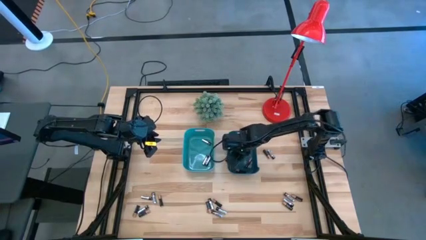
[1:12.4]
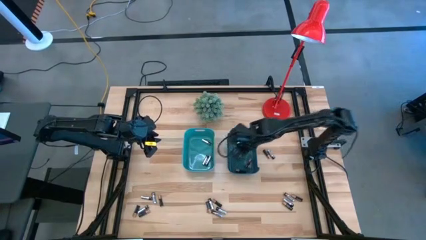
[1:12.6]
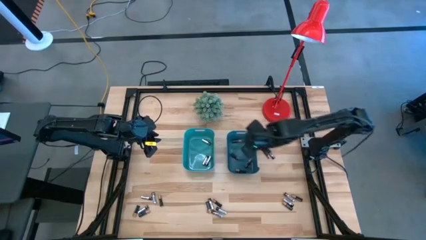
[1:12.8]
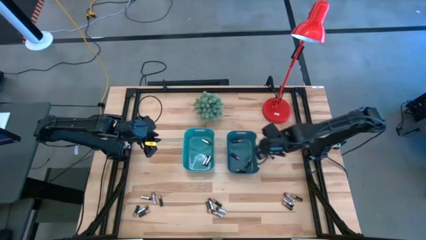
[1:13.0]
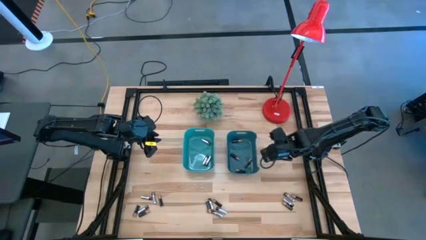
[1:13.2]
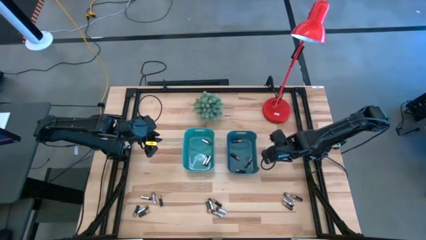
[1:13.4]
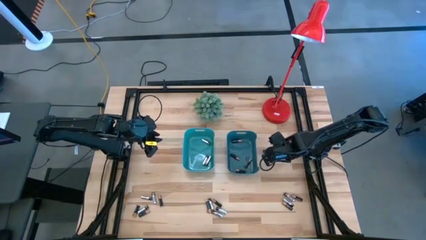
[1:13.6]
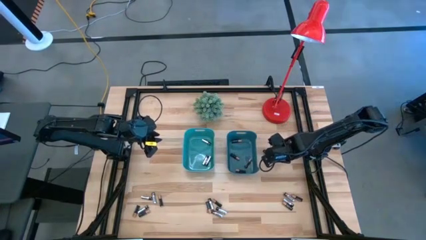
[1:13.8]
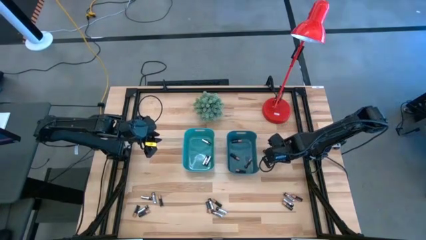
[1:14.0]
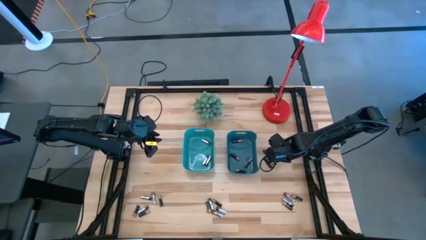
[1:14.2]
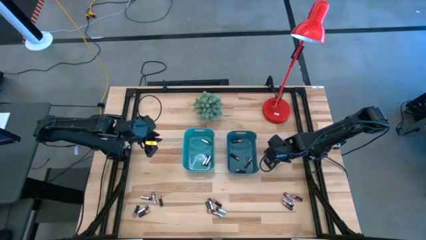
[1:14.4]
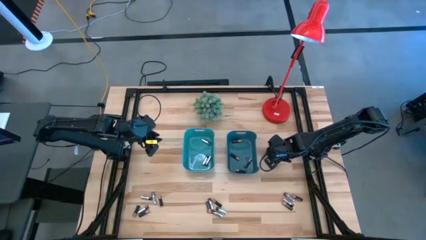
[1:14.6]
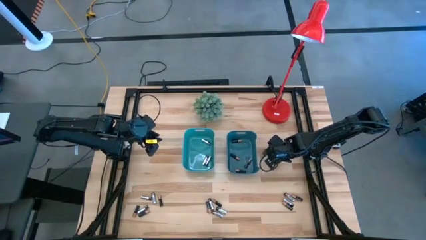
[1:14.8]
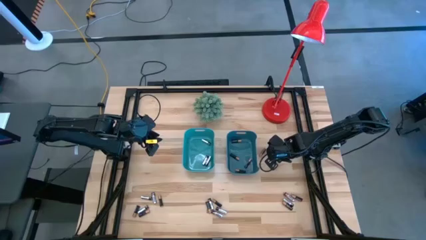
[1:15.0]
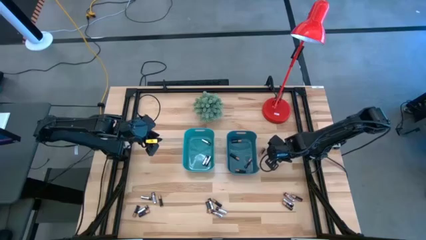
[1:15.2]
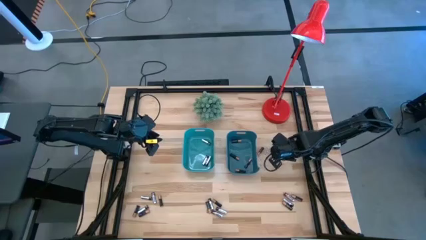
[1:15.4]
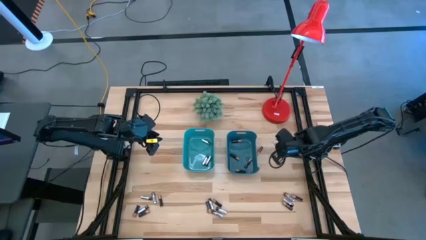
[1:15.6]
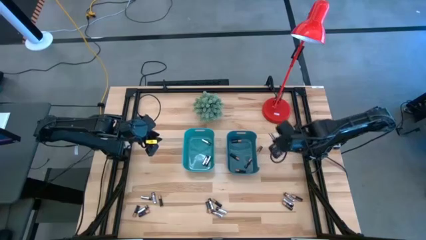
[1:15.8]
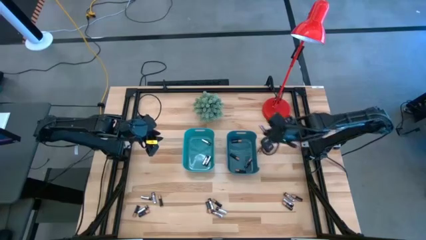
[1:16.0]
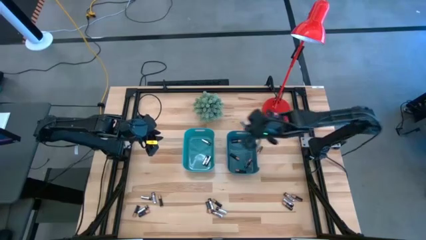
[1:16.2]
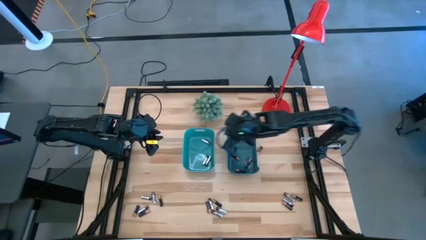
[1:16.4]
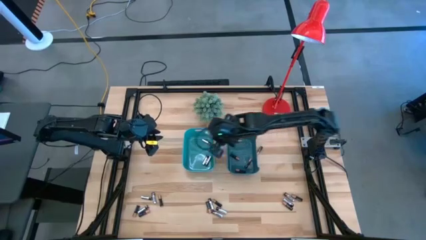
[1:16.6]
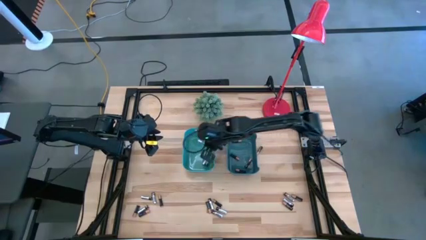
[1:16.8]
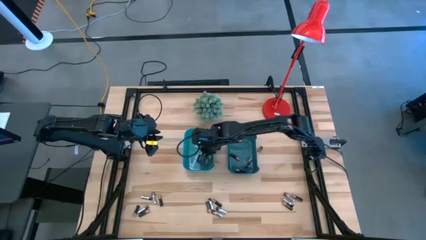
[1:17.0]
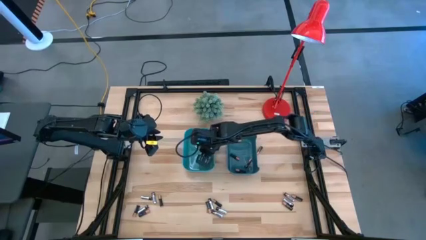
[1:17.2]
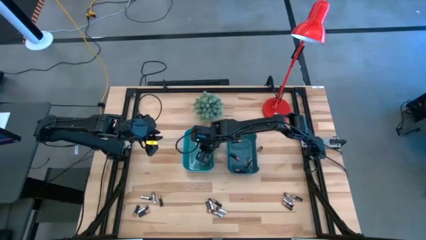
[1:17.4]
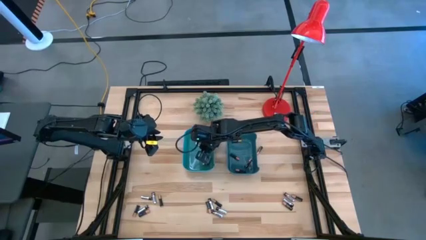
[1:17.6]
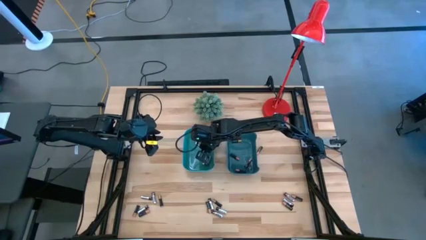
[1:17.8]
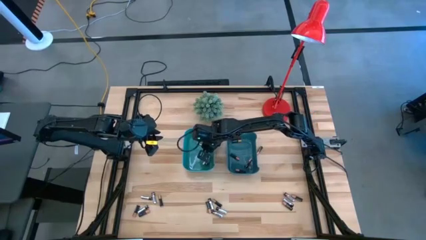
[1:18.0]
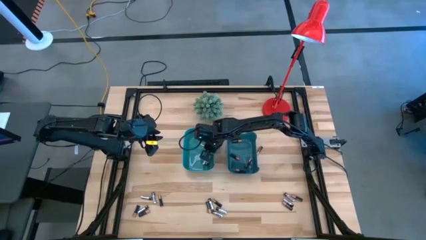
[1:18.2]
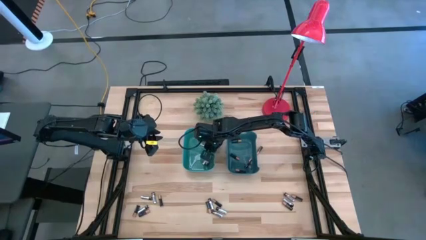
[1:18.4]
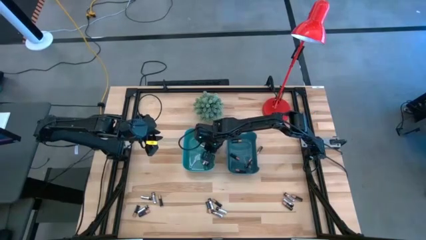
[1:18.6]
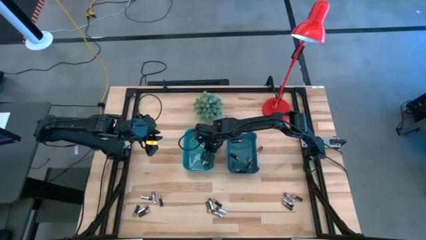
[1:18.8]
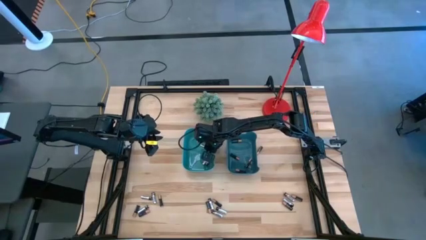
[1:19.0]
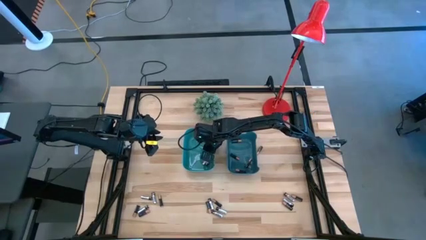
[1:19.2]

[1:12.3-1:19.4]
Task: Sort batteries
Put the silver battery into the green bin

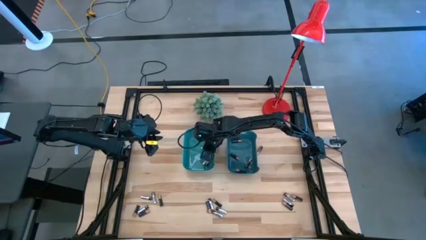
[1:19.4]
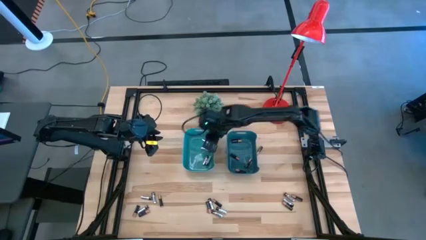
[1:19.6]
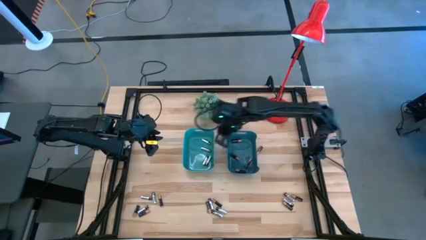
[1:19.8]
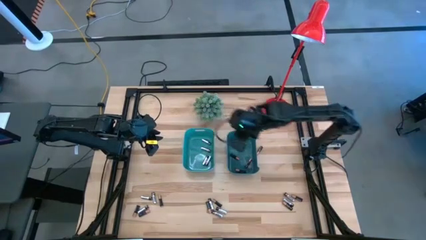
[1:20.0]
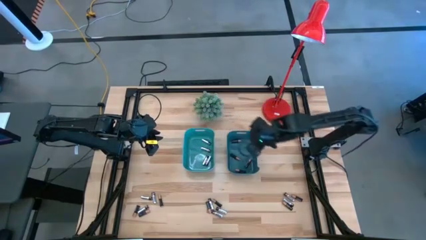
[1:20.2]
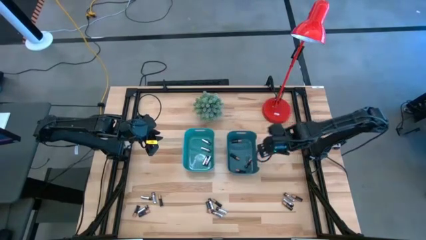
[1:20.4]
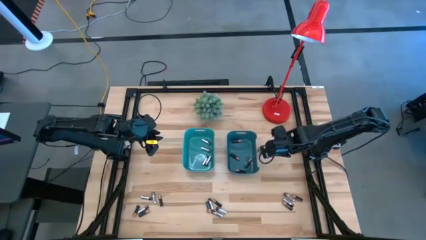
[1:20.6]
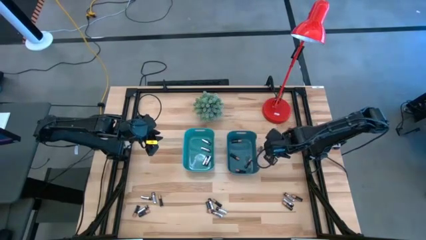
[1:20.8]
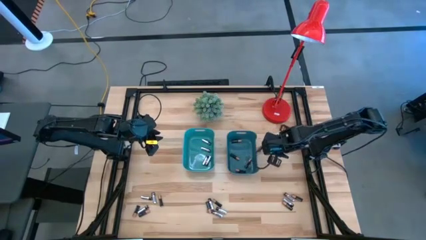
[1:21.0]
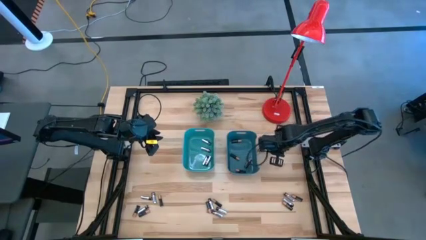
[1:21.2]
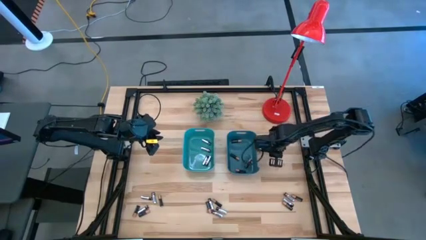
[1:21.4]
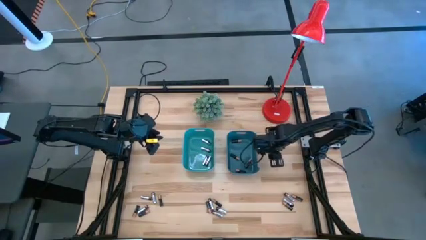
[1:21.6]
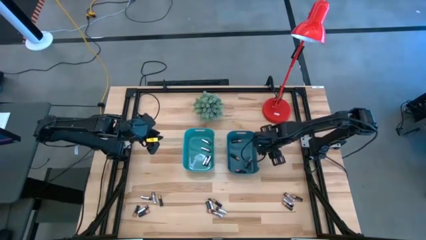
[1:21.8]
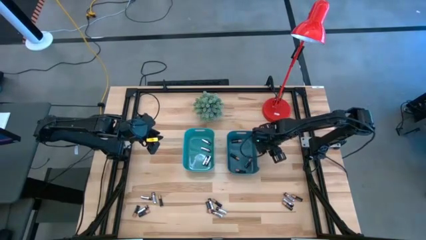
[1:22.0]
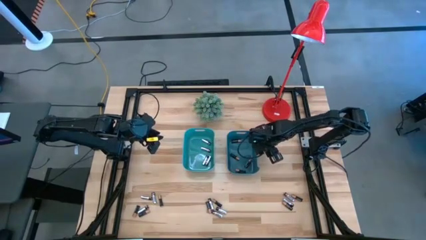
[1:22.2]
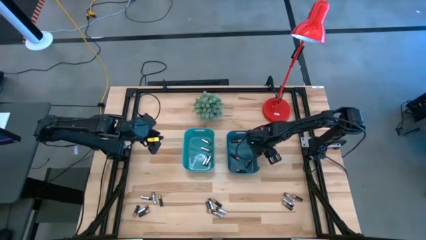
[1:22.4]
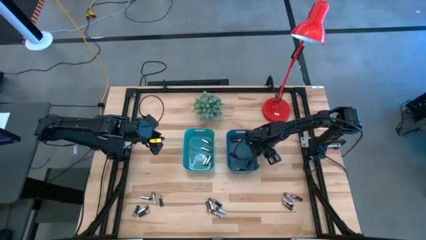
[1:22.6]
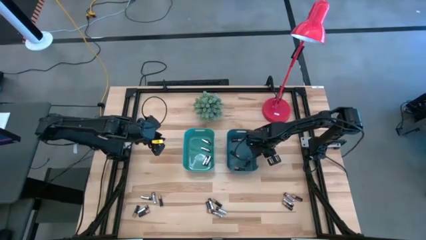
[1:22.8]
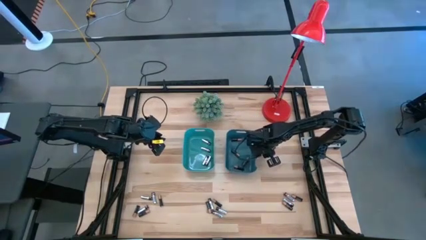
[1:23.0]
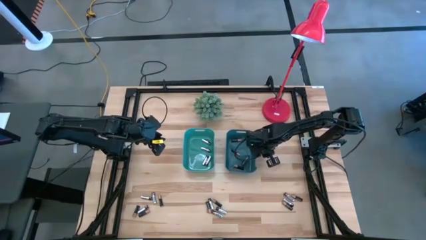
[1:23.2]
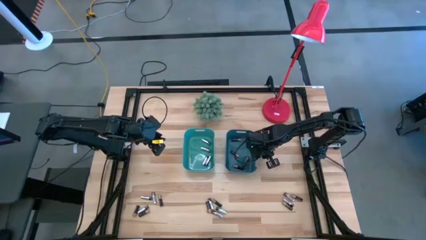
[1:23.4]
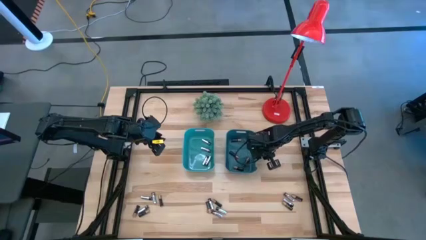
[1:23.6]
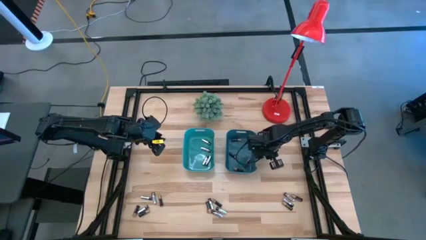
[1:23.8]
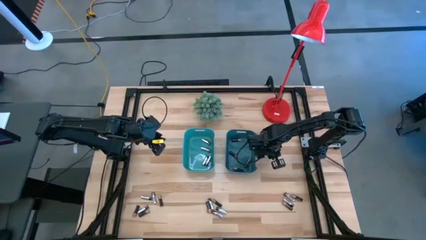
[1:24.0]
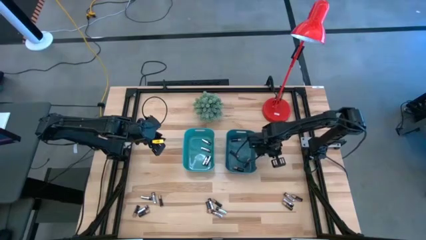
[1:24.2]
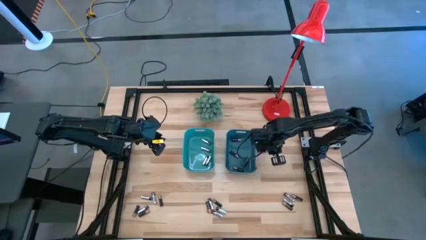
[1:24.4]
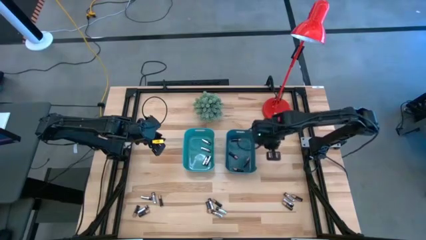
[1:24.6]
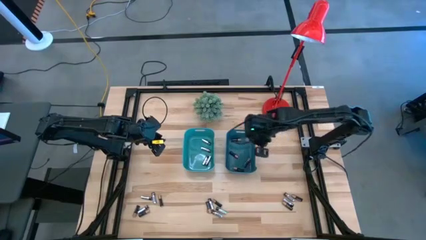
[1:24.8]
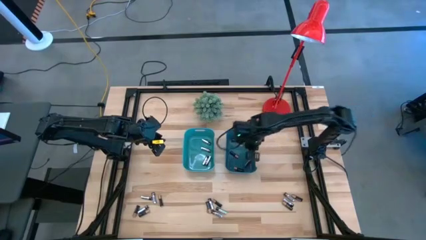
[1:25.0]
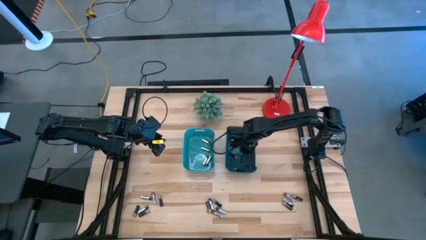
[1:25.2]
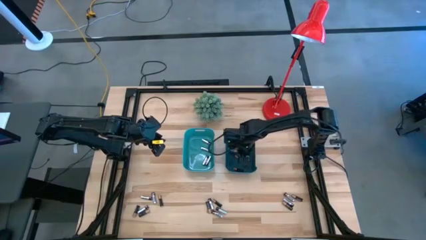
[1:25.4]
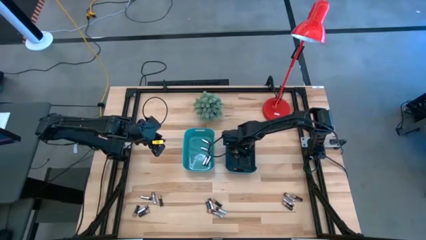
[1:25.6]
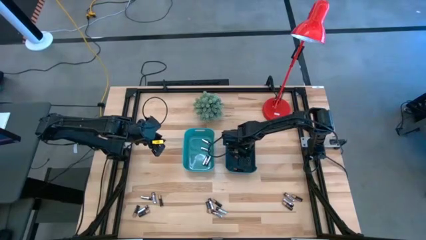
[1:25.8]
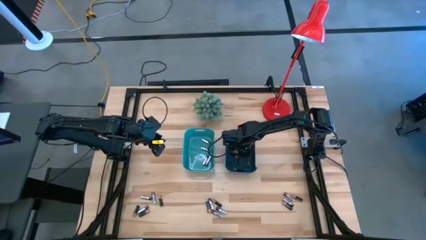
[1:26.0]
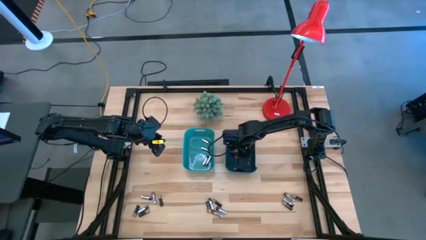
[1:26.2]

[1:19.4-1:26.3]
Put the black battery into the blue bin

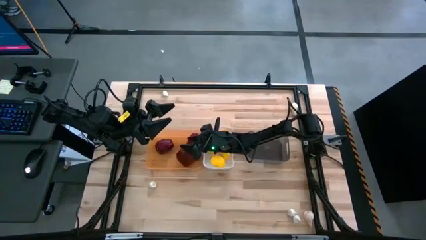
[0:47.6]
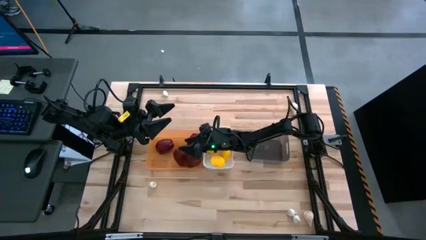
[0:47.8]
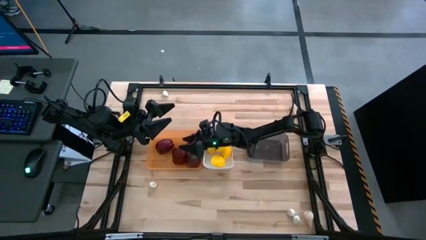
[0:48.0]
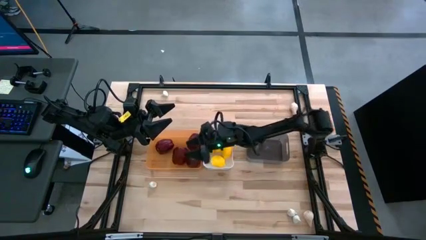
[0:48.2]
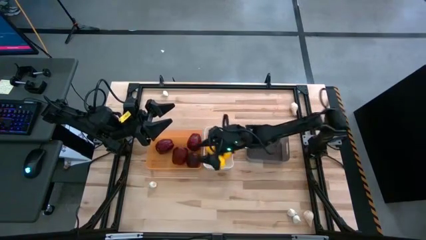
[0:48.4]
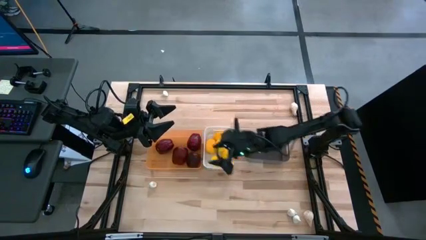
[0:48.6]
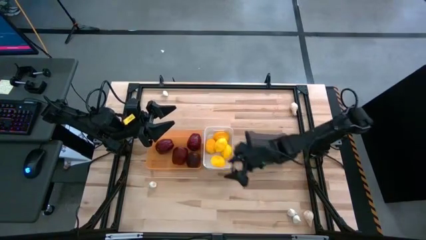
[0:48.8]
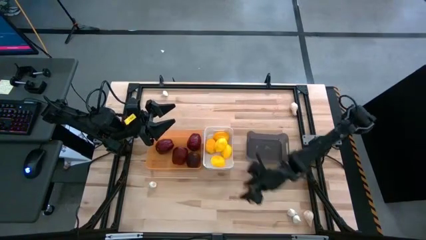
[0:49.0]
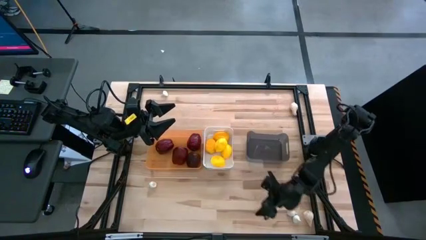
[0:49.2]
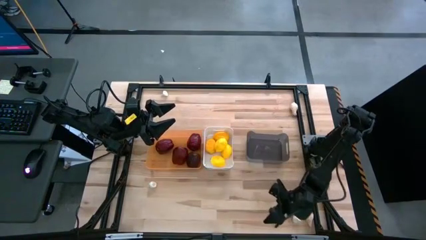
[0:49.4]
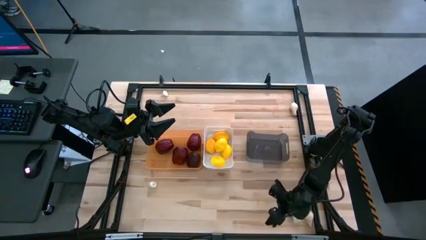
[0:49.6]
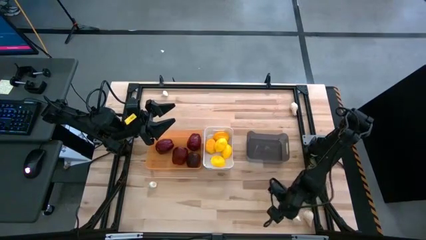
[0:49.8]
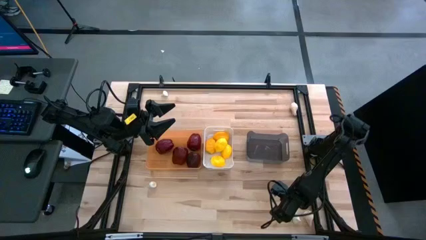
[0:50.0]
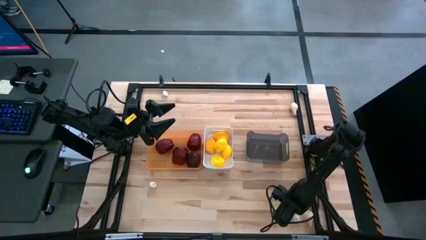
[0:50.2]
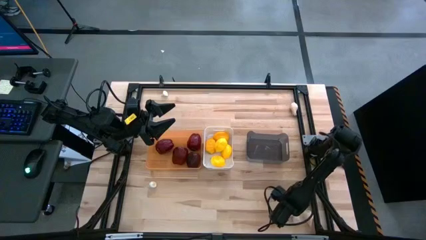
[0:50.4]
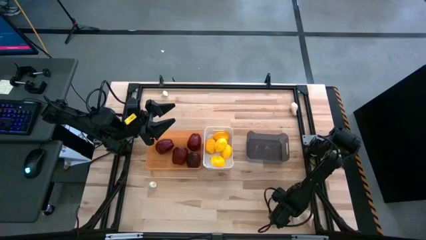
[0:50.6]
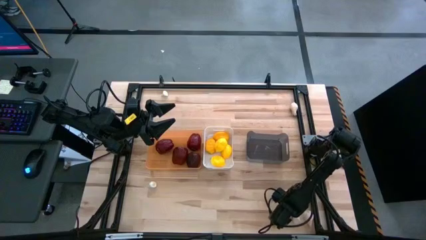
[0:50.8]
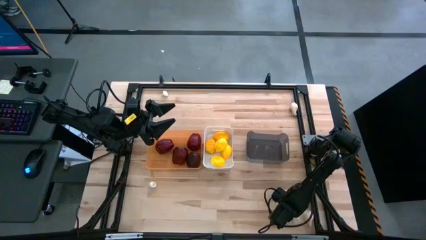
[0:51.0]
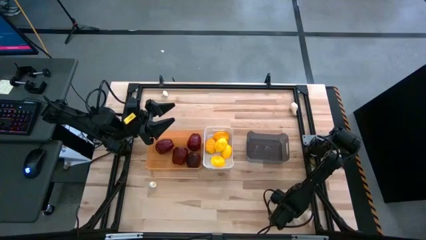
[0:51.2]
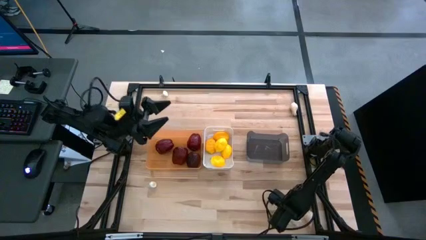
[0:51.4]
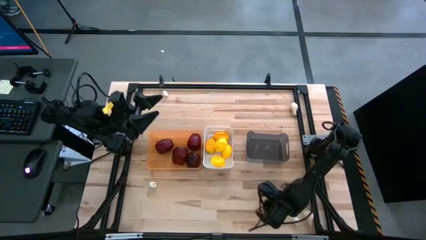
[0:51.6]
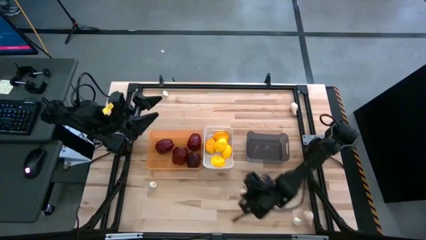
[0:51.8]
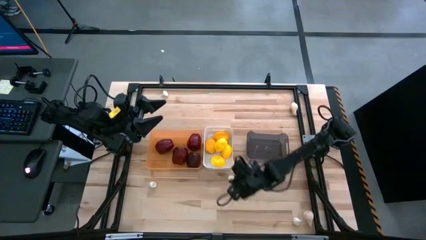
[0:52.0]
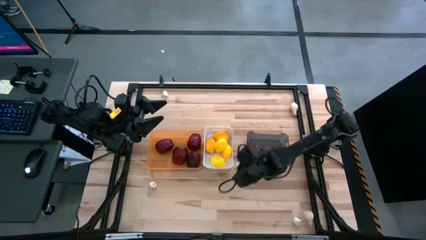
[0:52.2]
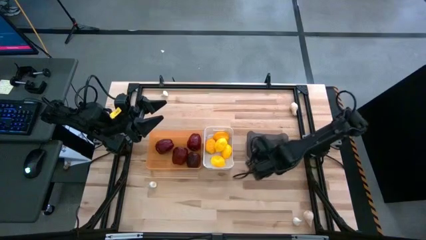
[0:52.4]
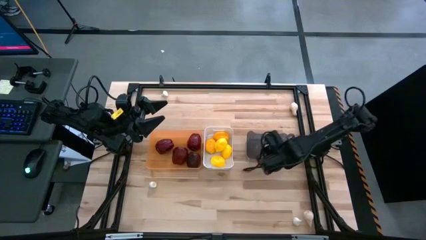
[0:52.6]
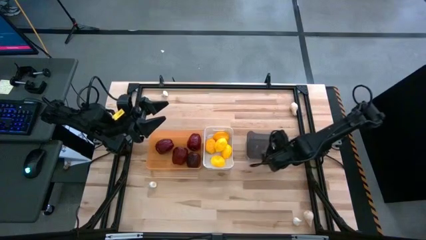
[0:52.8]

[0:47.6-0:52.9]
Task: Sort produce into baskets
Put the white garlic into the black bin
